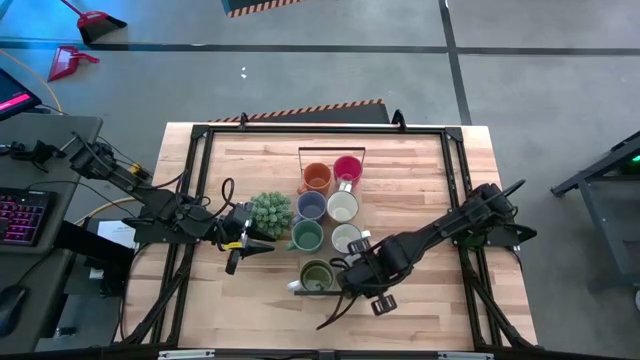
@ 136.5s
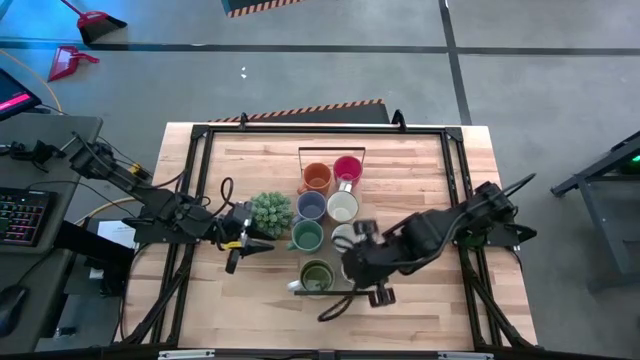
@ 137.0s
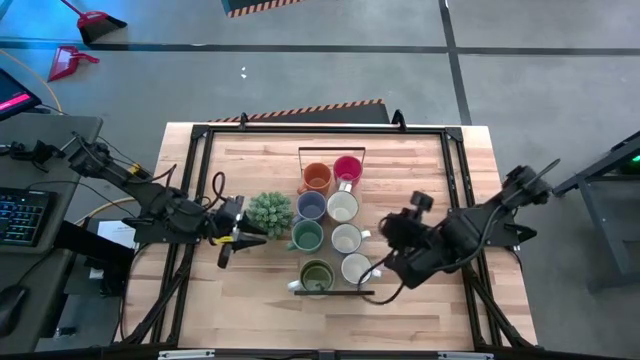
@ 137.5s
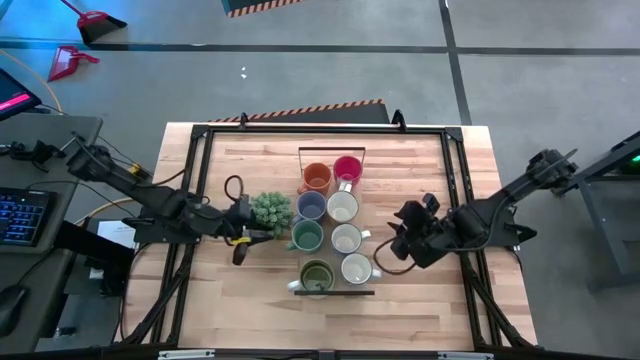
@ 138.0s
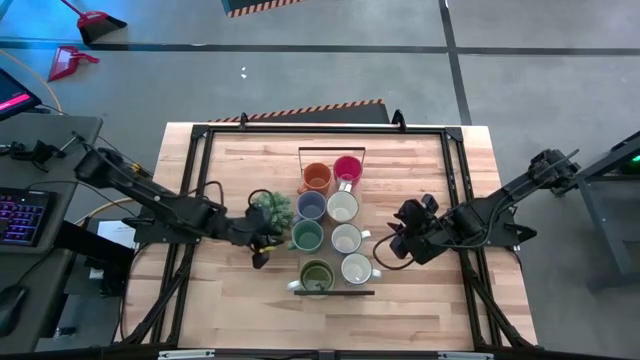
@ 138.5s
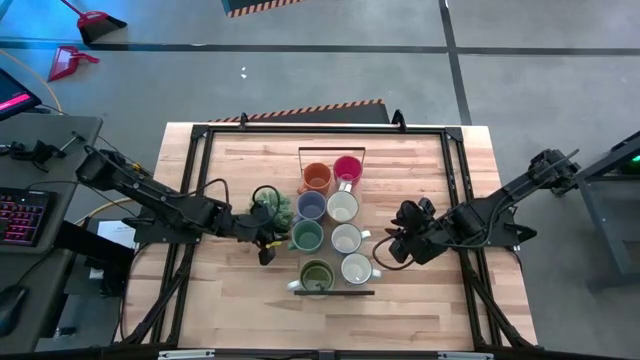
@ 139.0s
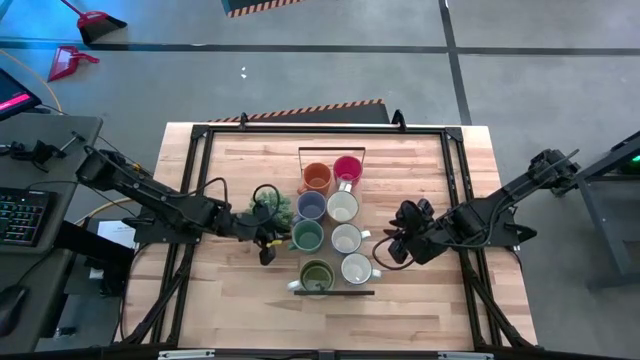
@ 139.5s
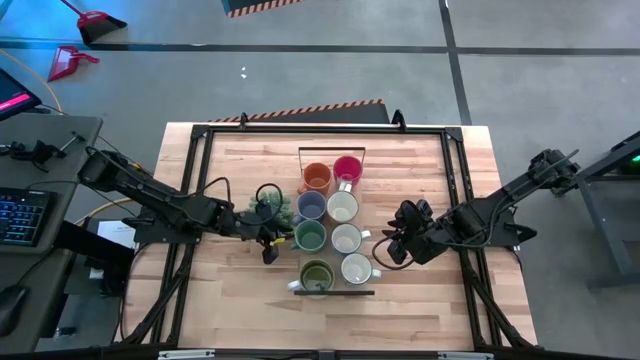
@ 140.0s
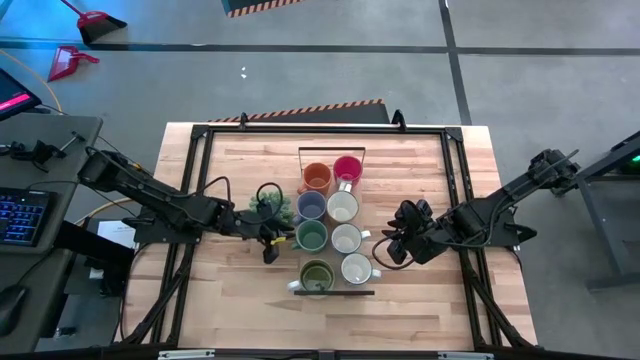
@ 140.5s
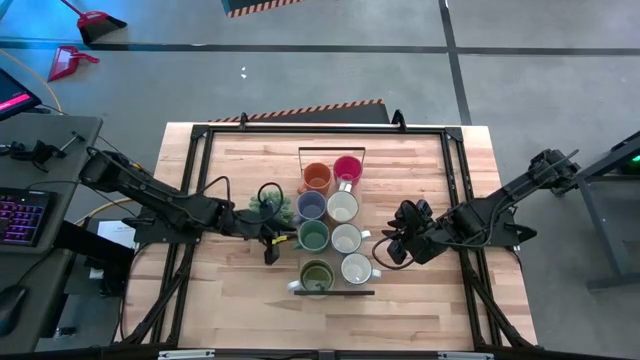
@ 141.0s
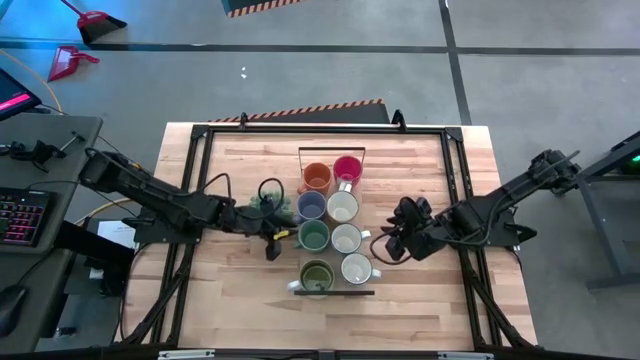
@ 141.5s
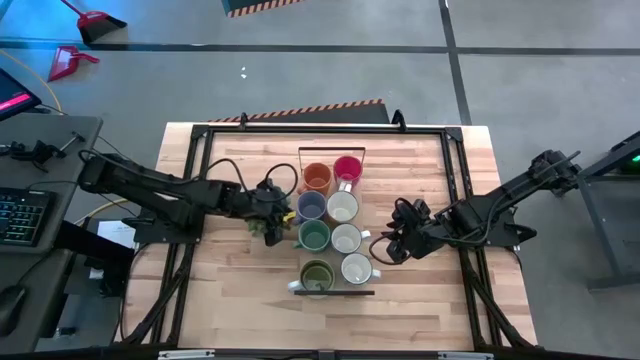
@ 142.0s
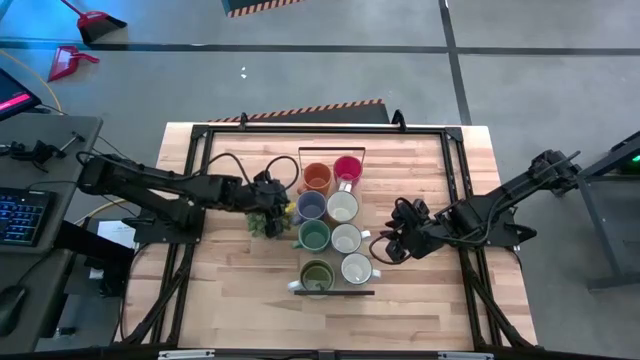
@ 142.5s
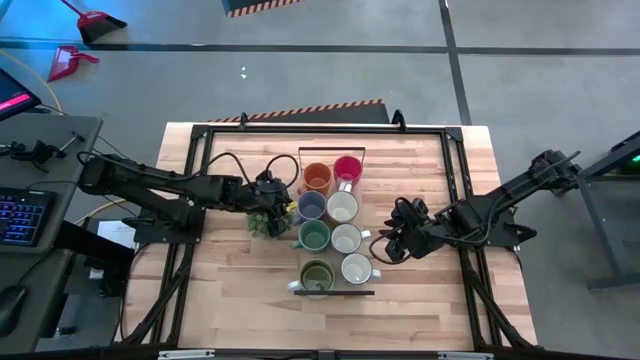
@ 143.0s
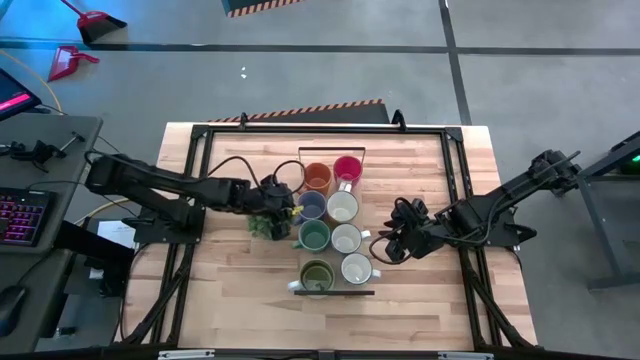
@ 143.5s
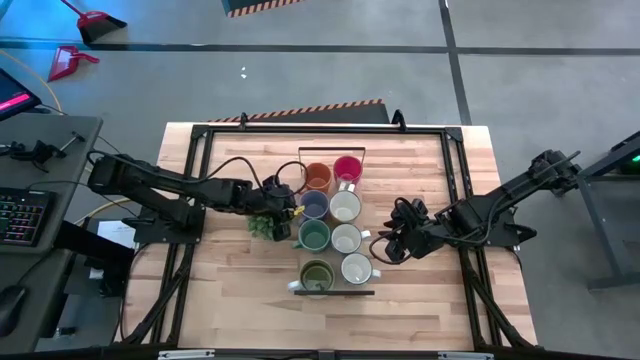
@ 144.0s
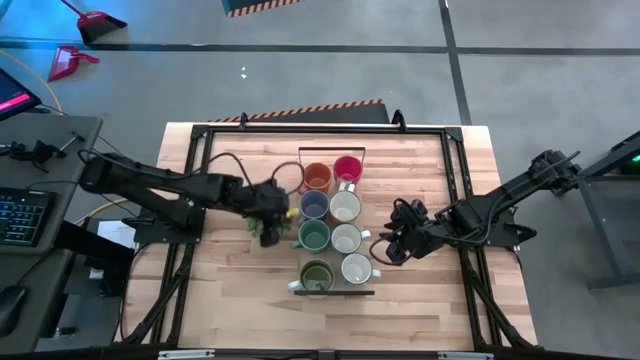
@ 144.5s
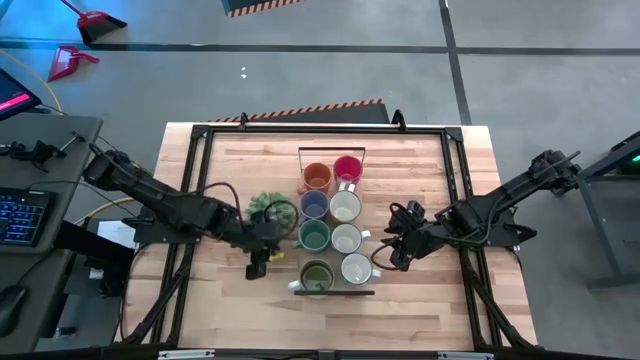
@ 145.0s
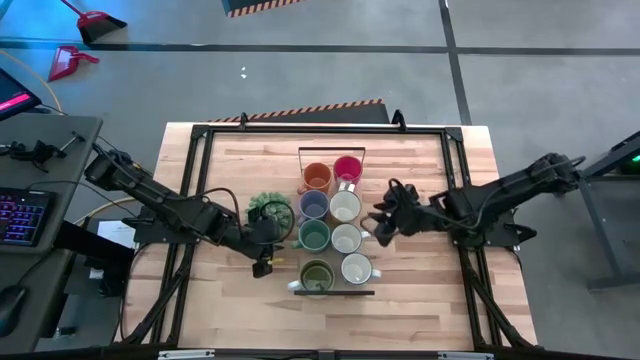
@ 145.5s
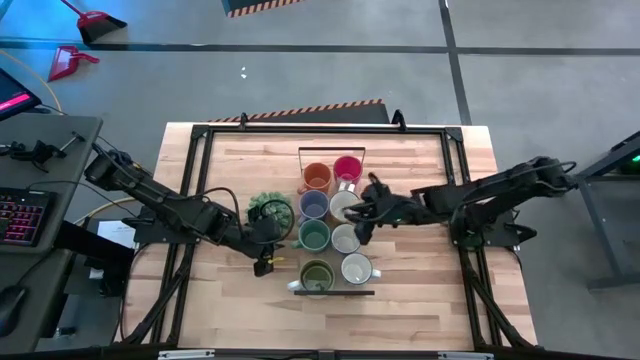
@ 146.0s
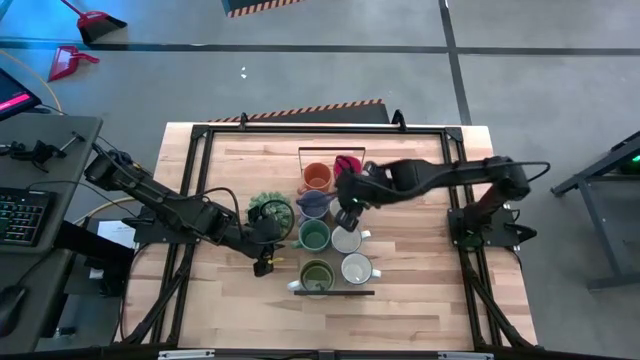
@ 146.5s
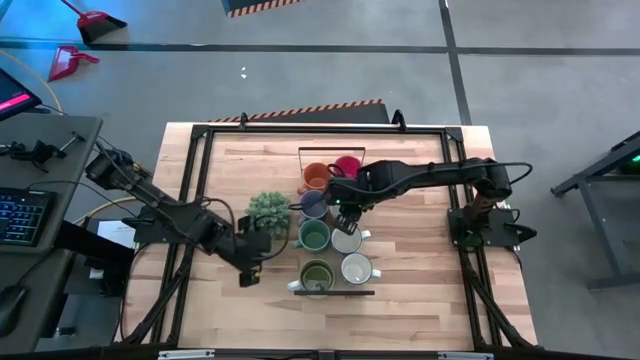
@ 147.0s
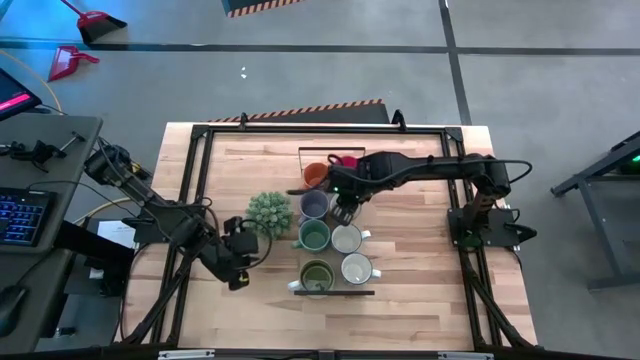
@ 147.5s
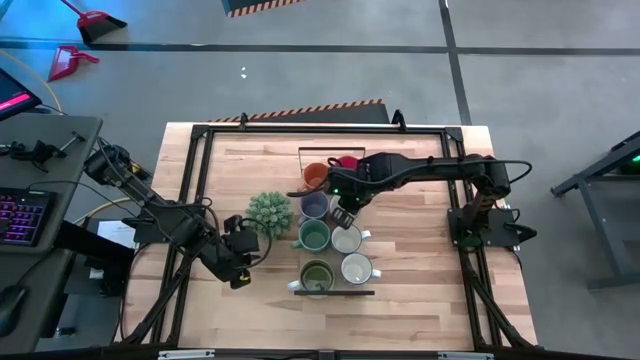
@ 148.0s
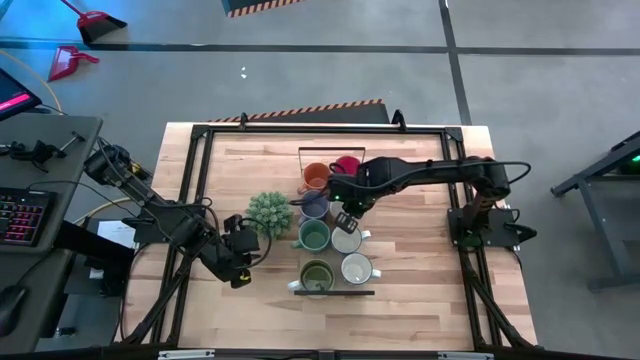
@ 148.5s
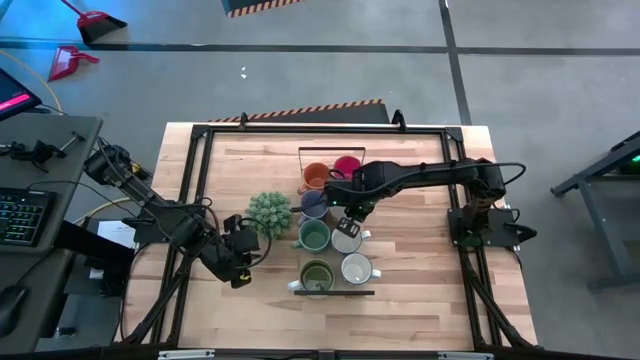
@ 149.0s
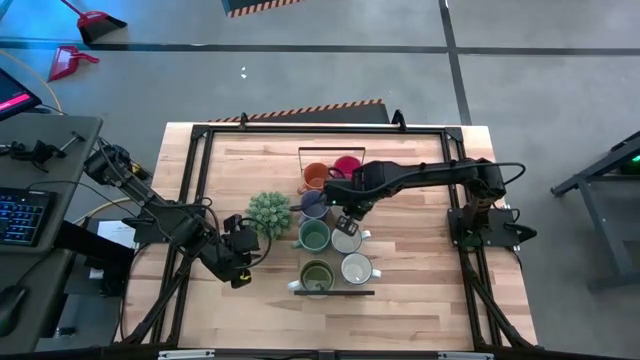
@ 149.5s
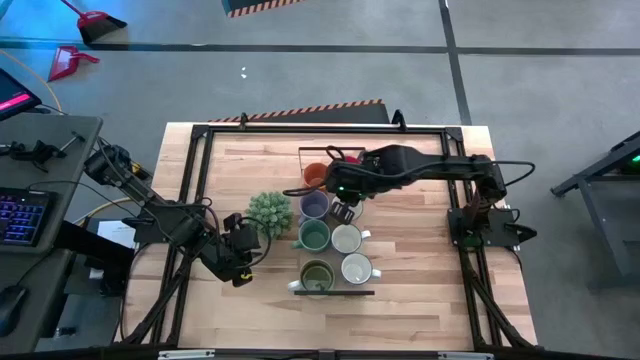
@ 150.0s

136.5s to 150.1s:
Task: Place coffee mugs
Adjust the mugs

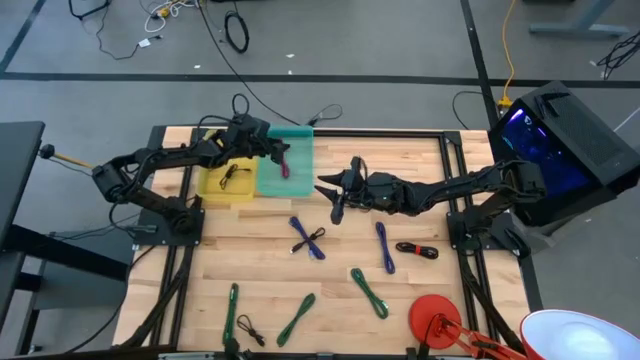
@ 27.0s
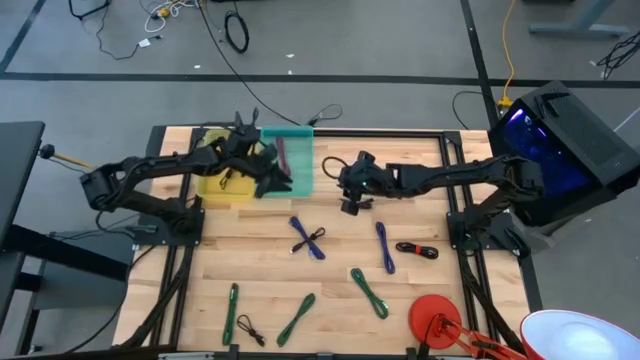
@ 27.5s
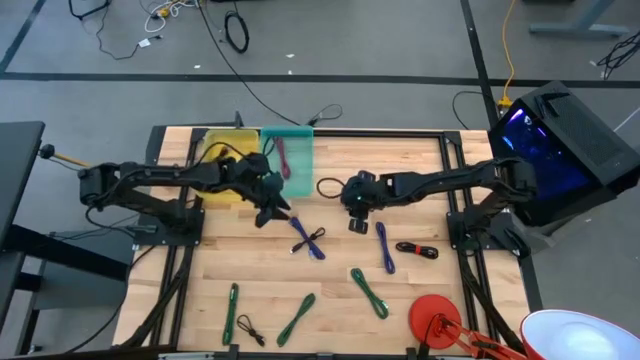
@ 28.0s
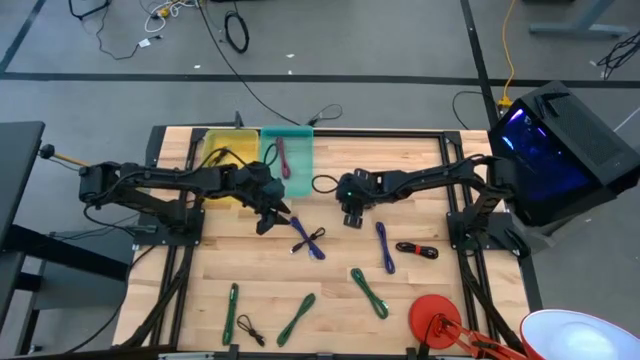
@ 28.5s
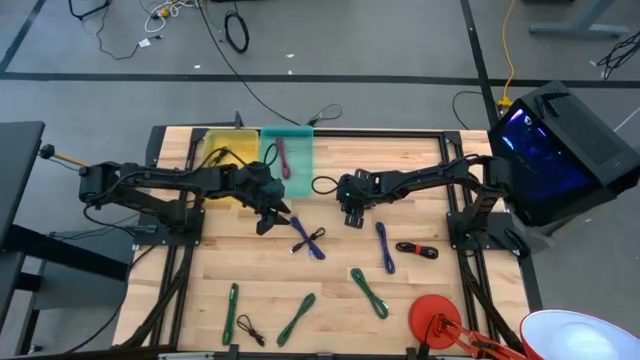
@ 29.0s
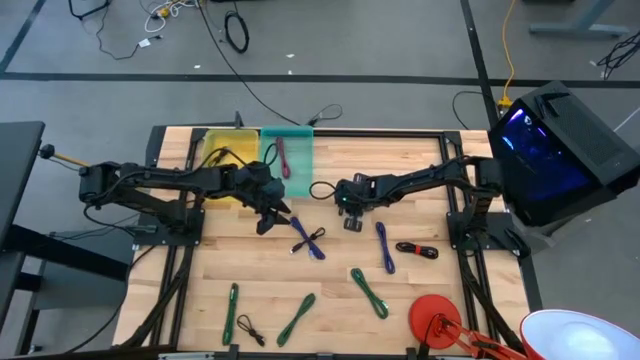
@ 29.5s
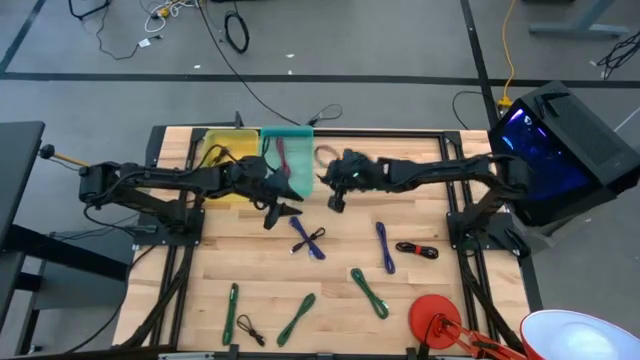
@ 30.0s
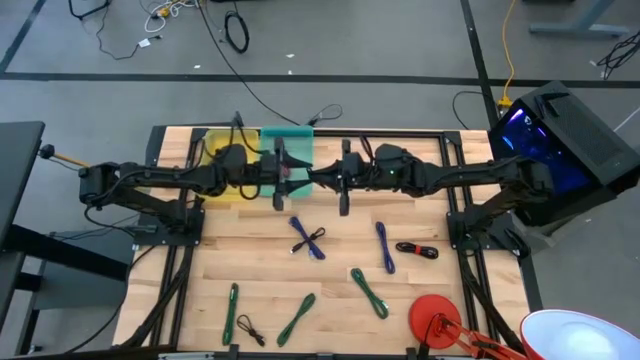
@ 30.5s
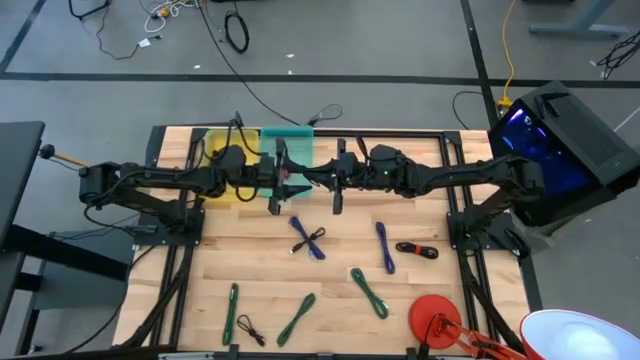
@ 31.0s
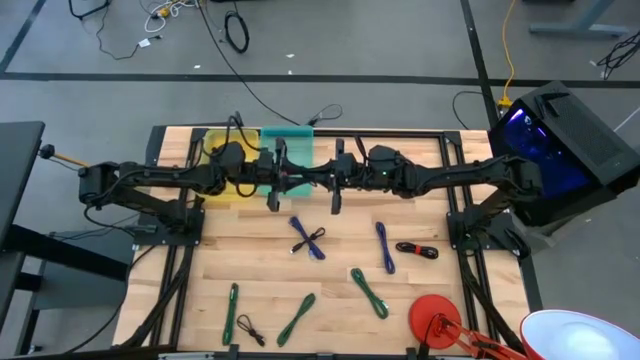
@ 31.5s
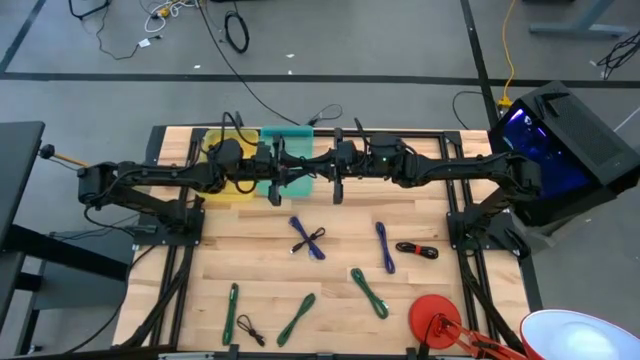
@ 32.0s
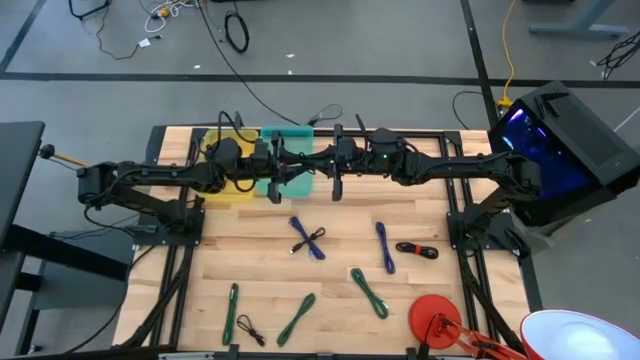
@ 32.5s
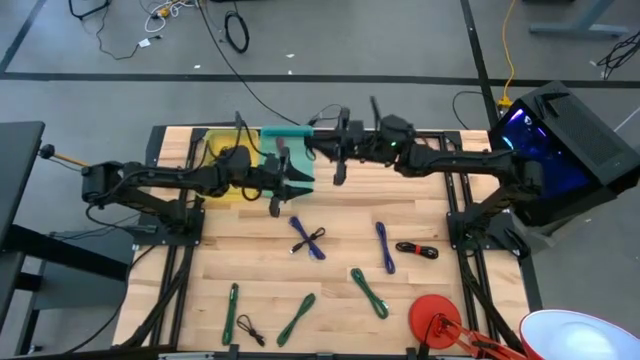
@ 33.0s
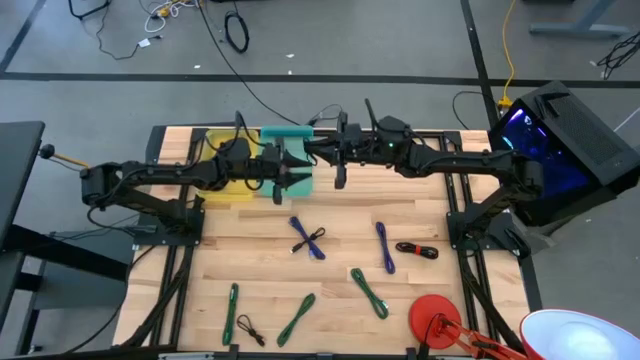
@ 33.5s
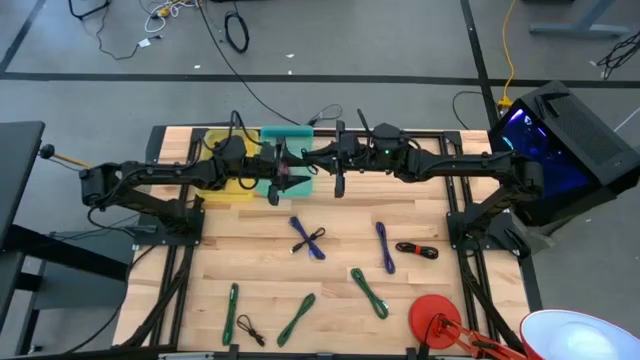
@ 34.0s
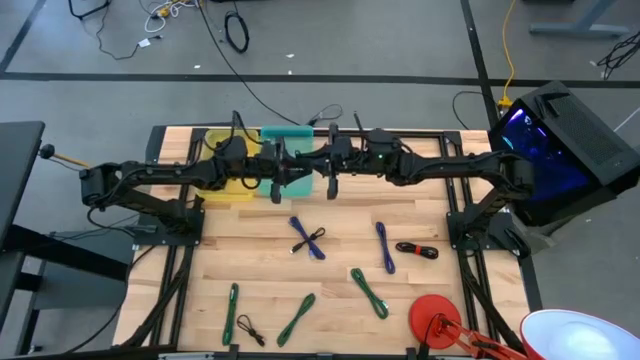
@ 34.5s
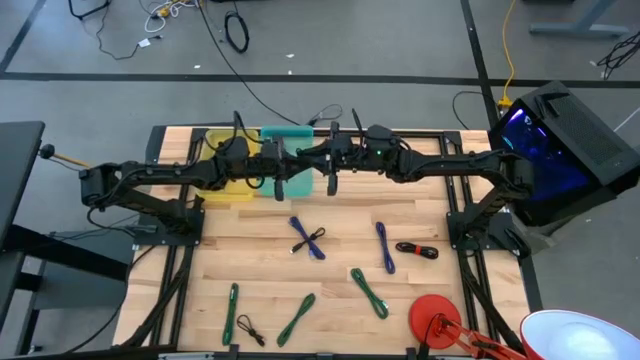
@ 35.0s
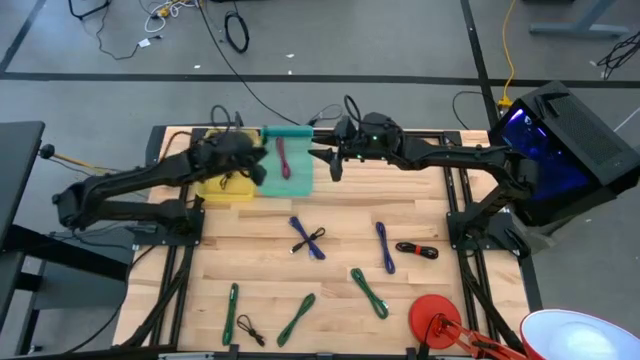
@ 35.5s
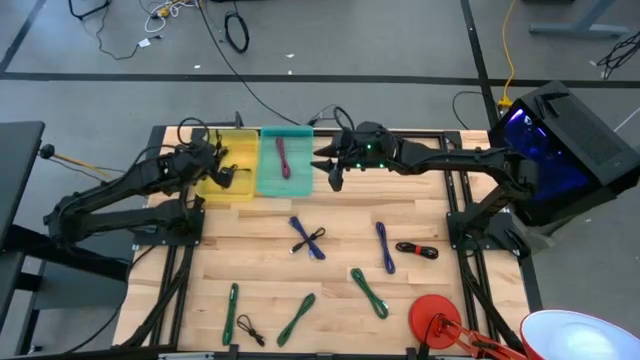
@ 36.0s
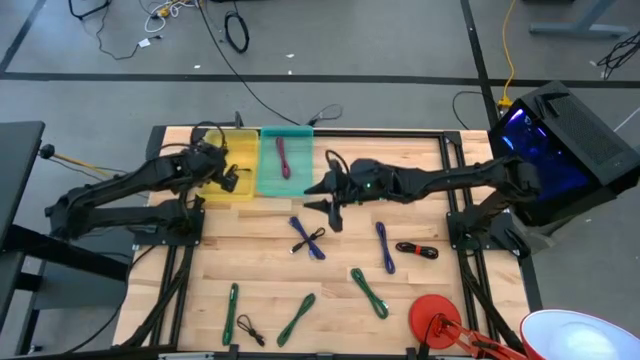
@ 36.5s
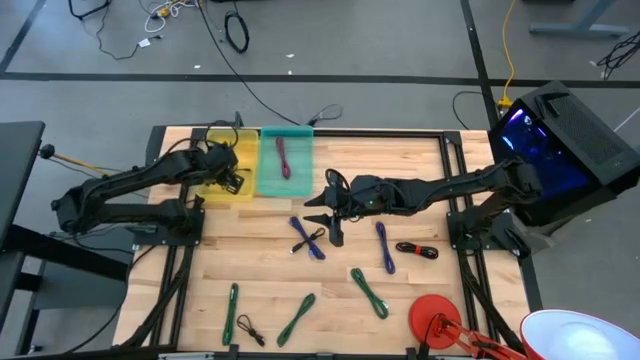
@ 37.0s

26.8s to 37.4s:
Task: Pick & Place USB Port
Put the black charger cable into the yellow bin
